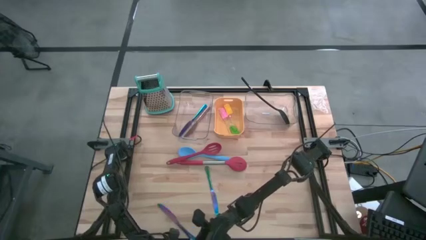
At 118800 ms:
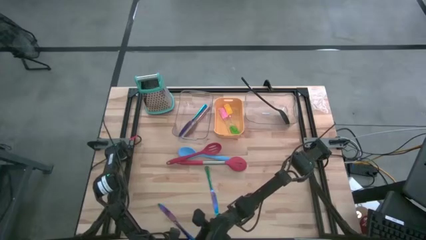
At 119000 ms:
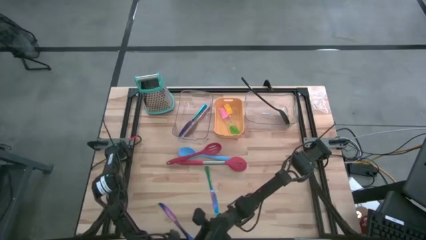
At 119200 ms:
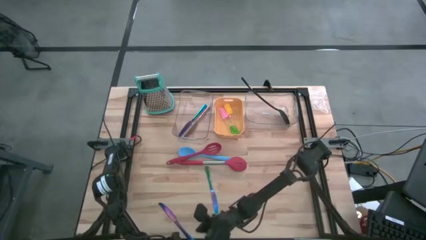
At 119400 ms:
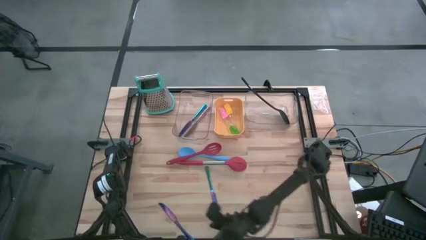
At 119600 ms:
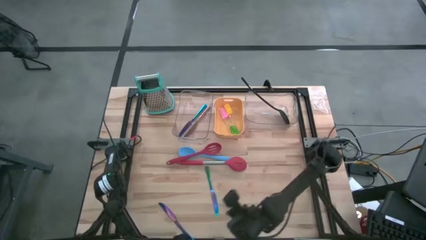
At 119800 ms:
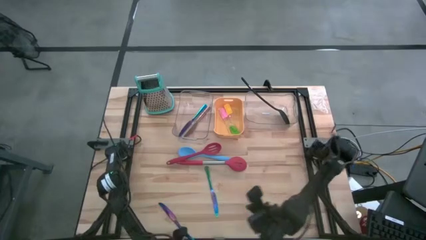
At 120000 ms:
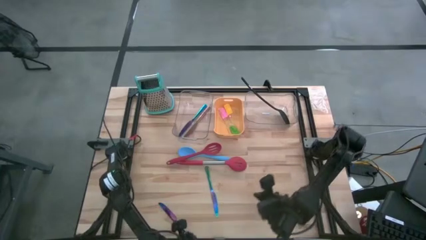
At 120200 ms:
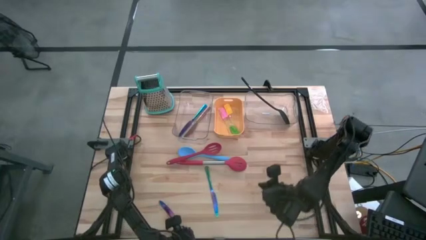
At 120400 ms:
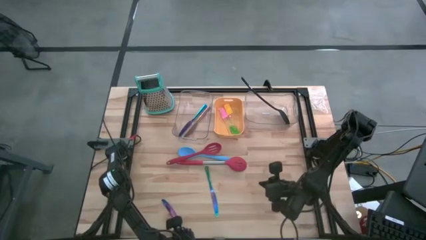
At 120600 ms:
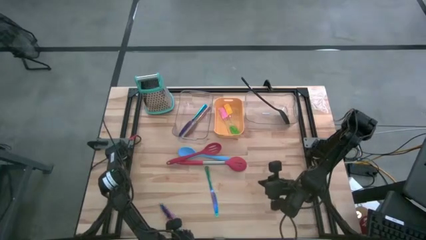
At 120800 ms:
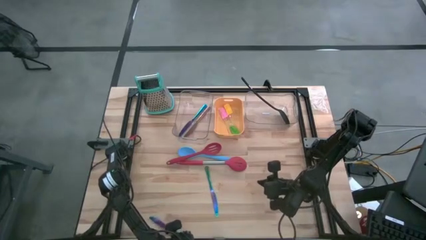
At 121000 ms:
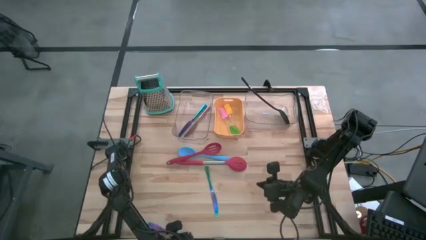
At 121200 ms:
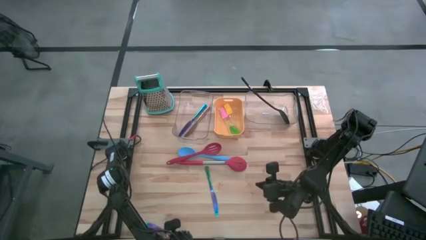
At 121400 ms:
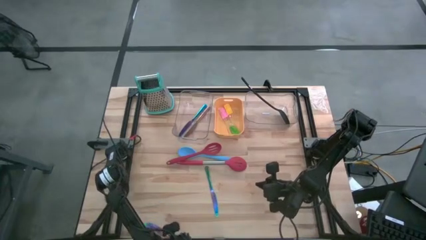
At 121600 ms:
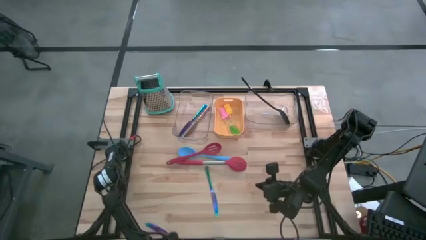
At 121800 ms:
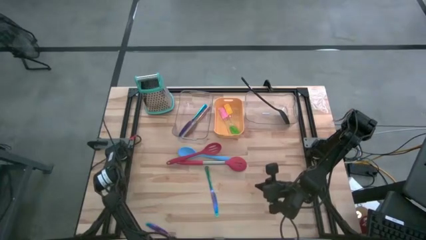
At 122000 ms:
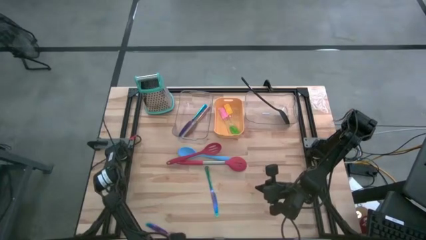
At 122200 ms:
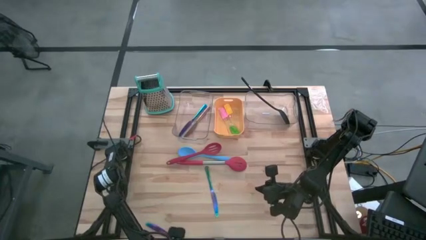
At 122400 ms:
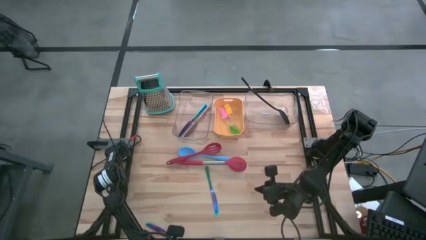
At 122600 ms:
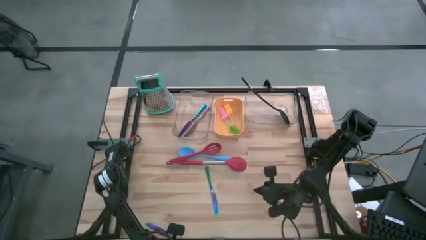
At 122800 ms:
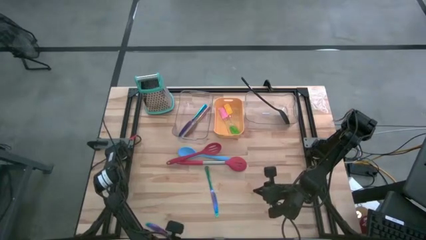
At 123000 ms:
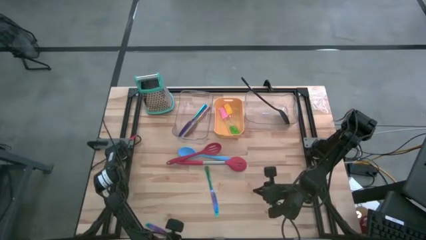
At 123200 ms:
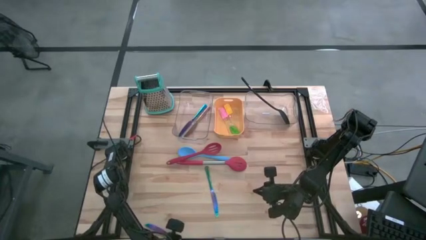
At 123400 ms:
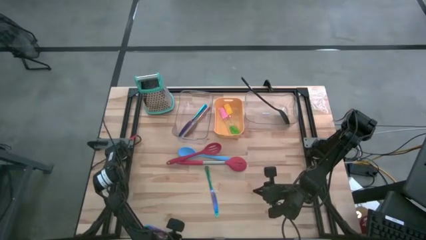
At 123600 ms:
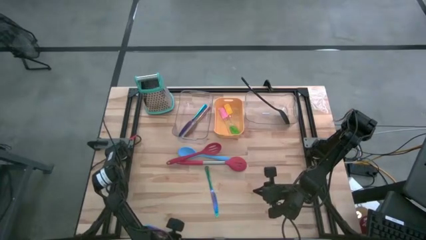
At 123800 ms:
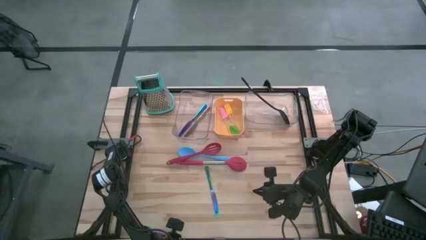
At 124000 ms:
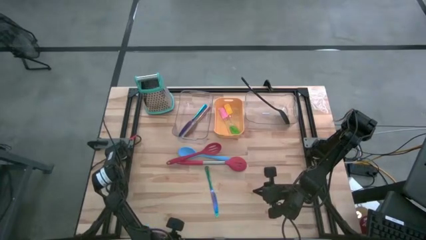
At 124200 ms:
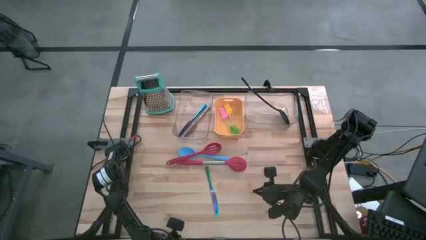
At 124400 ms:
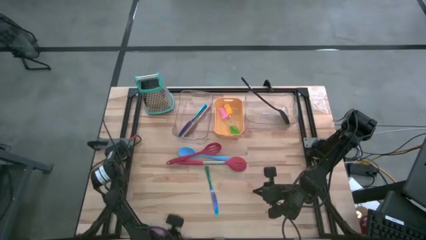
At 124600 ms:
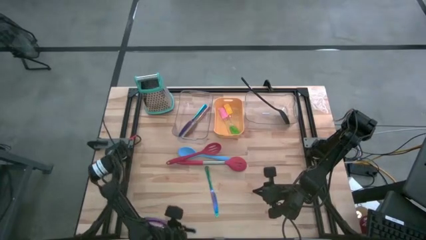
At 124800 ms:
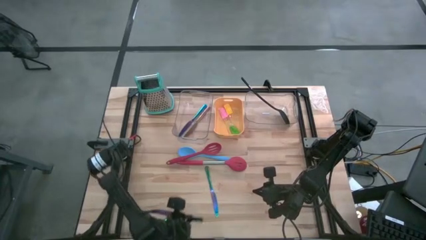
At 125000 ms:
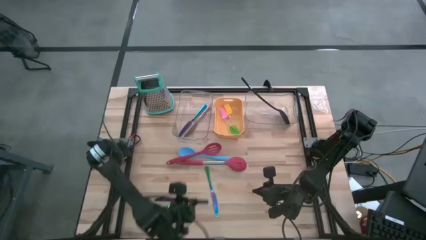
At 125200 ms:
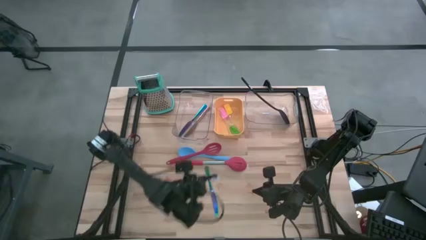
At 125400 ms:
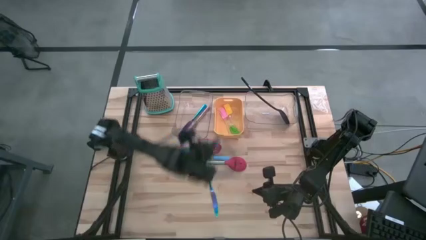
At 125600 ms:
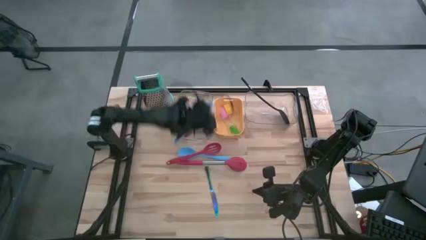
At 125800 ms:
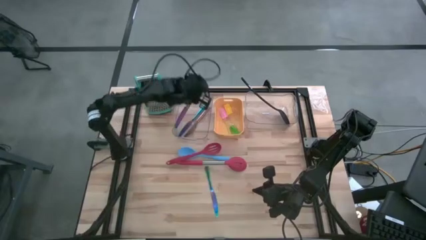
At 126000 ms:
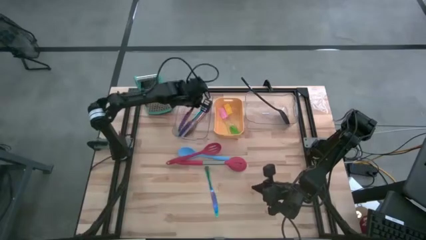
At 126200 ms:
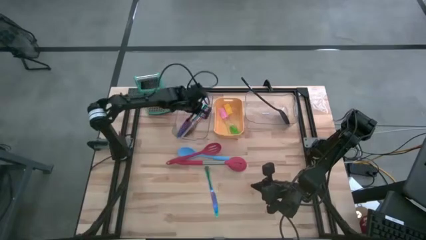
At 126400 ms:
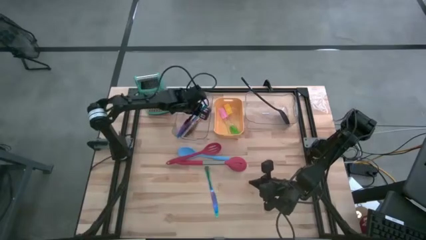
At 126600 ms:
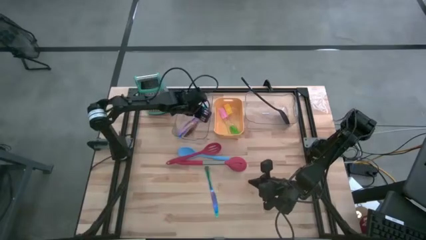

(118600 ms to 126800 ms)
Task: Pick & Place Kitchen Items
Put the left blue knife into the left transparent bin

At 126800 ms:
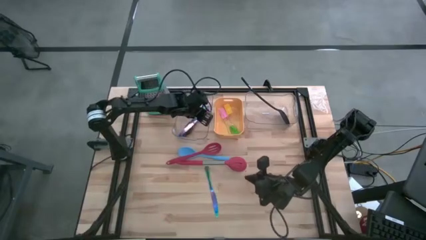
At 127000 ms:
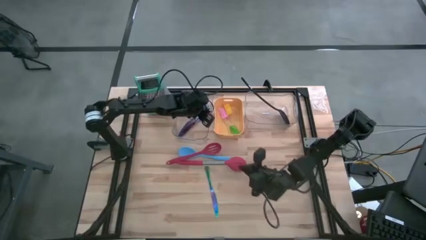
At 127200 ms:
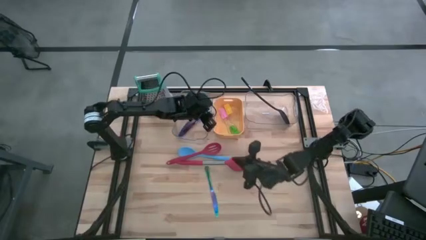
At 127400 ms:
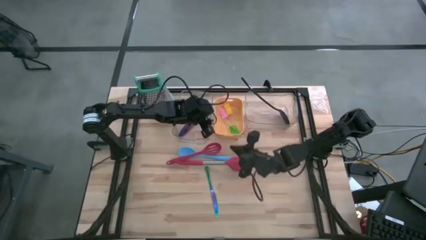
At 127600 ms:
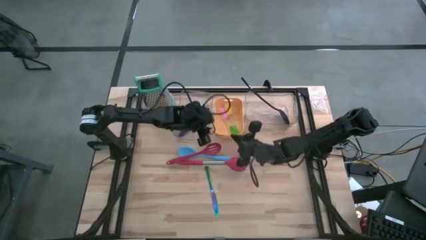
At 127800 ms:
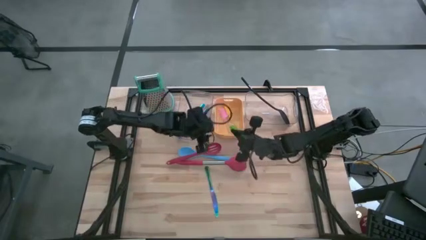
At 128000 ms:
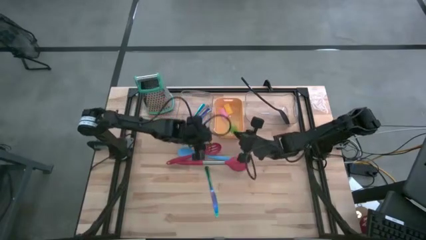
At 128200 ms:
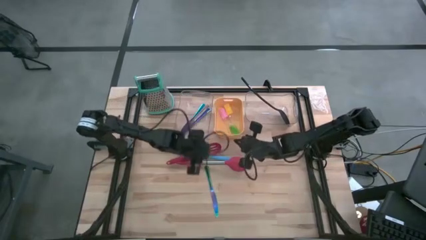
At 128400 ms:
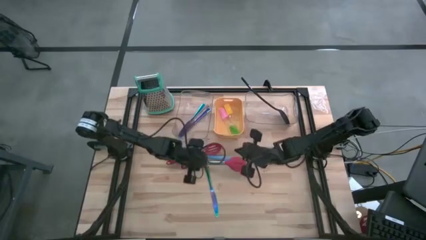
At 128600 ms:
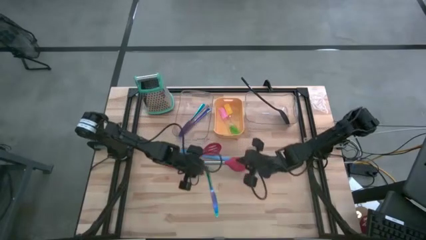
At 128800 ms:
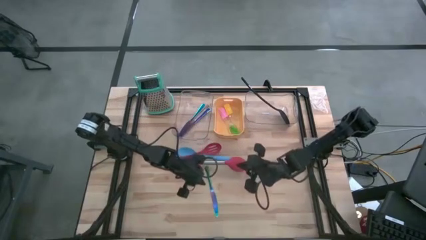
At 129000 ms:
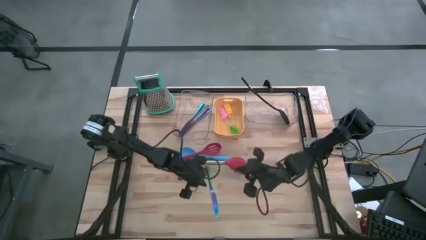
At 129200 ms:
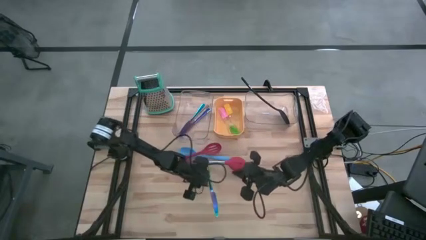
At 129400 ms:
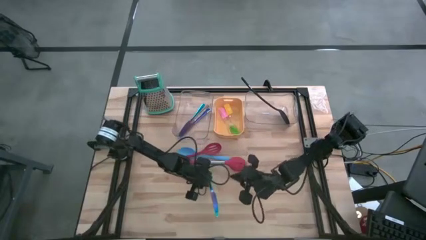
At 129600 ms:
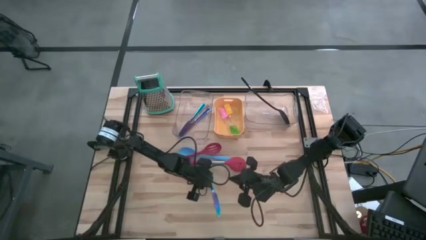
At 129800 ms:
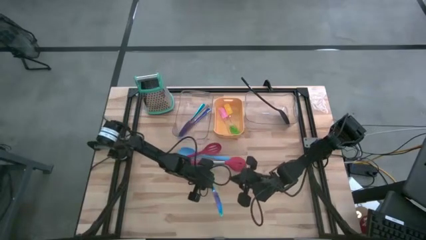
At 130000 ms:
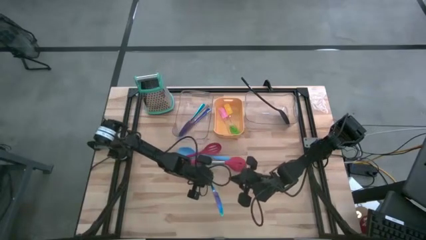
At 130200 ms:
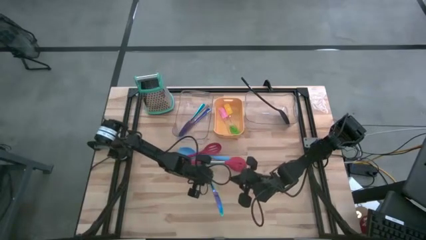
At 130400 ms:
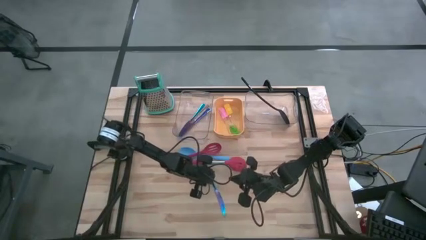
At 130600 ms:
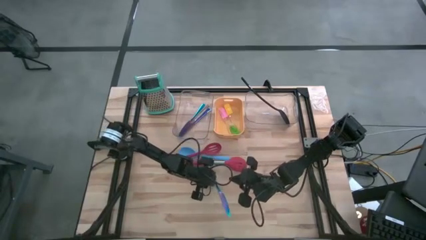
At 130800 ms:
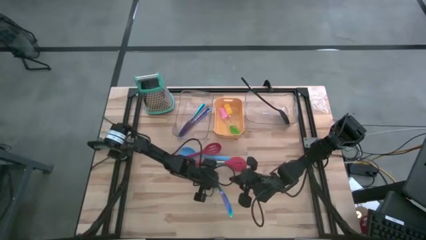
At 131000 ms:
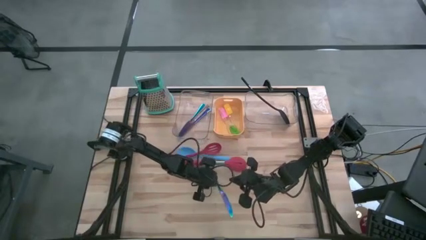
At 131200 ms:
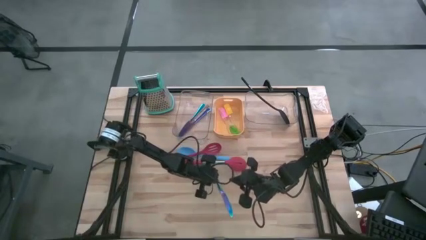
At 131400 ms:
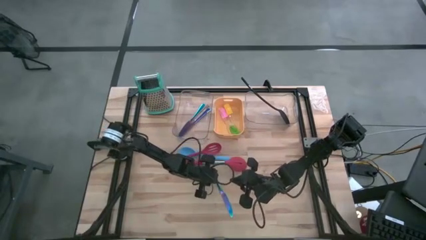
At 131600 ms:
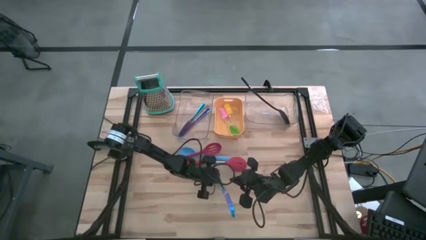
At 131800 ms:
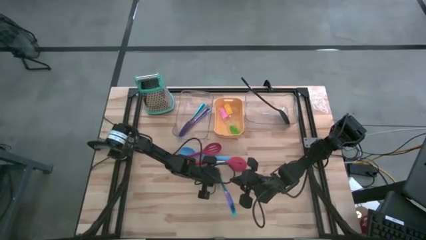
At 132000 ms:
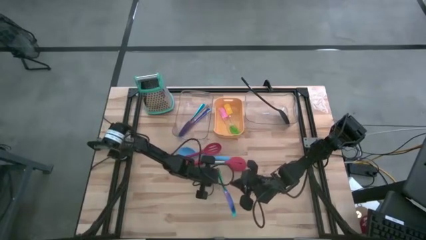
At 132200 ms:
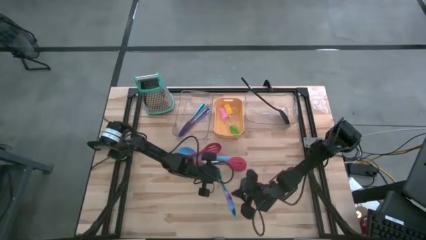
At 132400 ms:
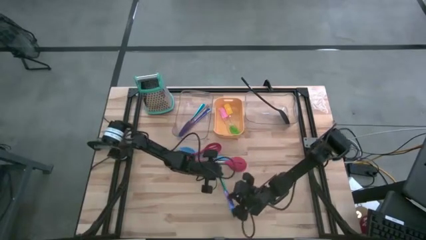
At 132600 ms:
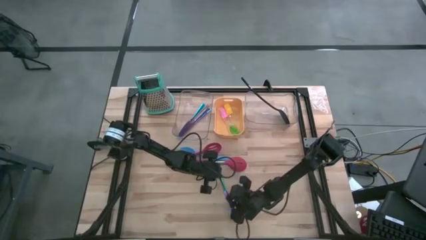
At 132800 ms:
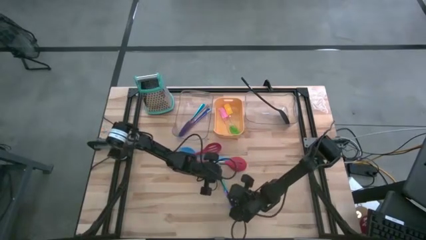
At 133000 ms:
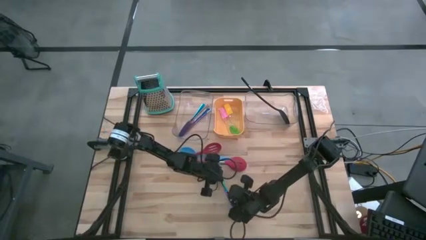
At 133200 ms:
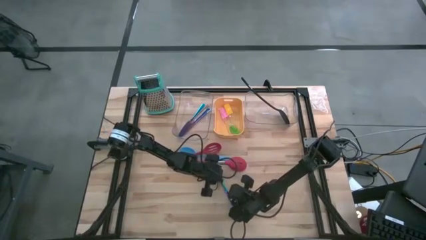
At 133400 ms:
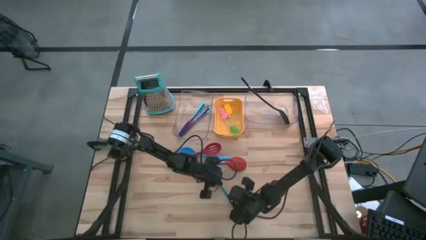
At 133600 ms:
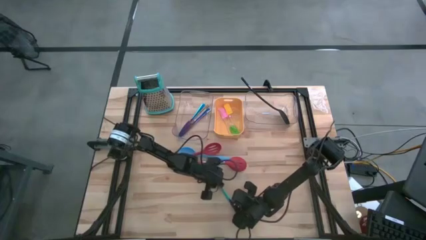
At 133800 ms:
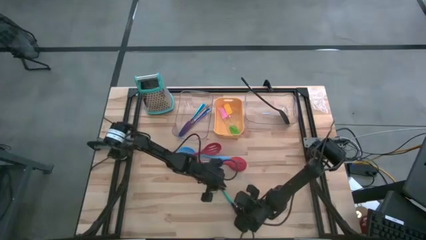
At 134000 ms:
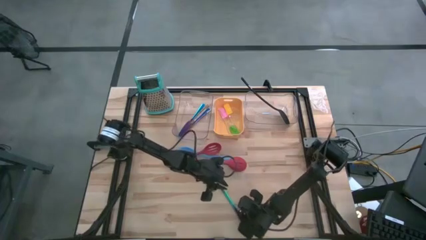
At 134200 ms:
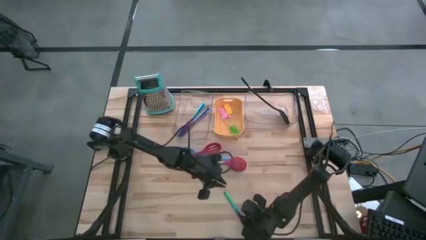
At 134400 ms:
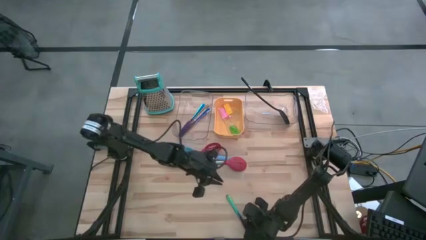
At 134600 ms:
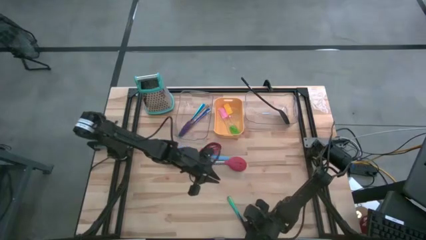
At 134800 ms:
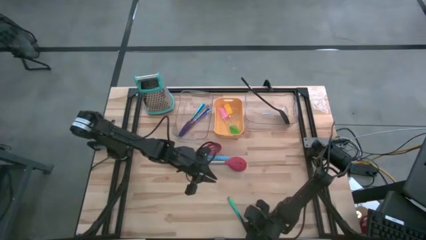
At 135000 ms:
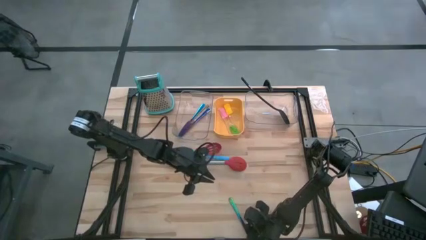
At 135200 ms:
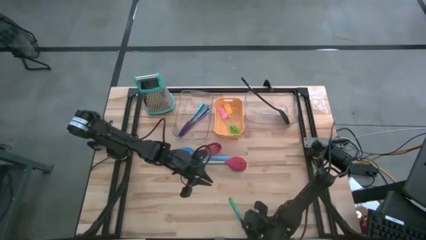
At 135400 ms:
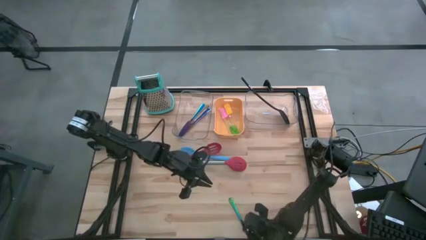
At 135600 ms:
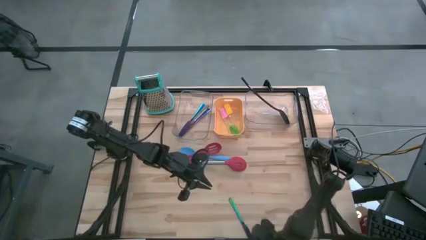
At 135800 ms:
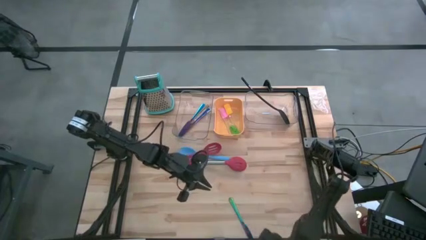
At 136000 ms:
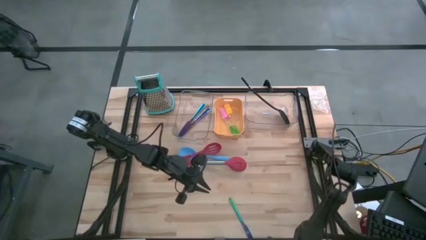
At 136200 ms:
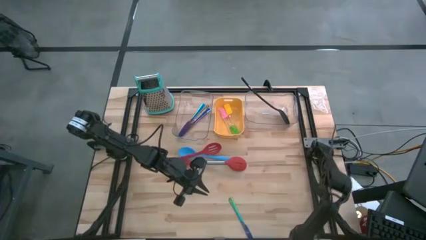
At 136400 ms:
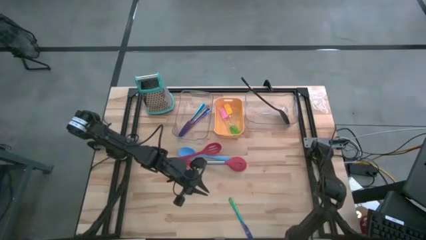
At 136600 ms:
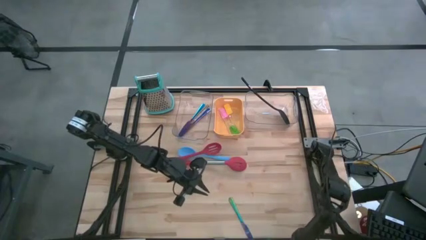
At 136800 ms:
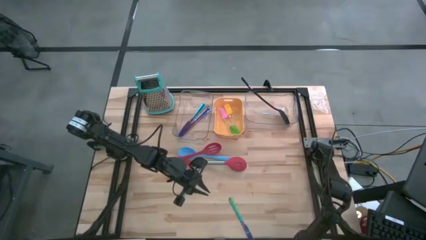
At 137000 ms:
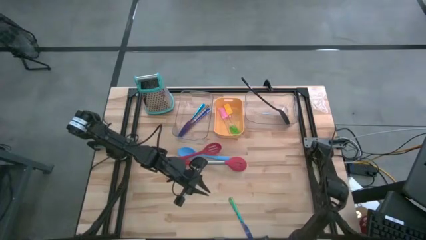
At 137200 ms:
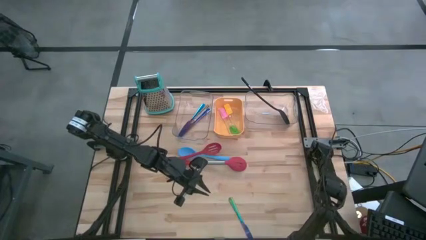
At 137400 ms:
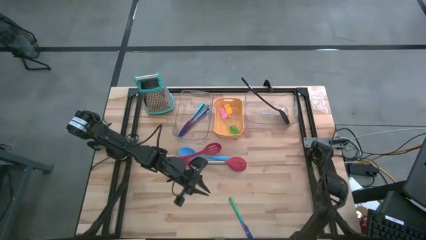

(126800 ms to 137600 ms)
Put the blue knife into the left transparent bin
